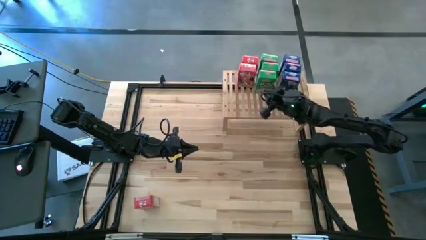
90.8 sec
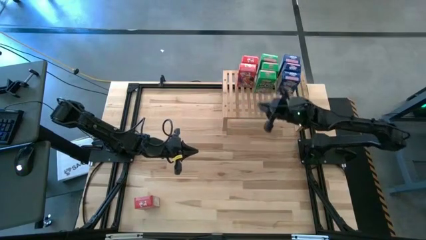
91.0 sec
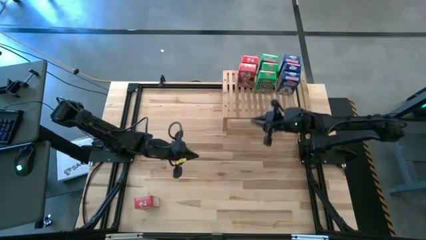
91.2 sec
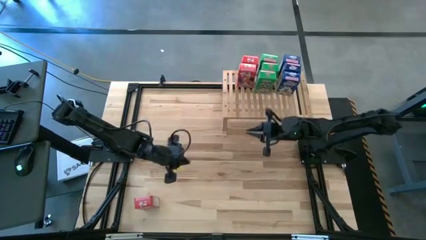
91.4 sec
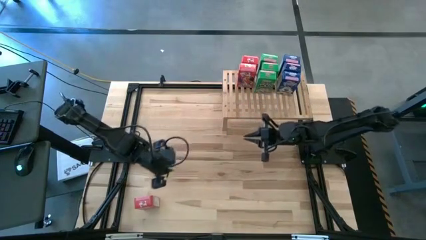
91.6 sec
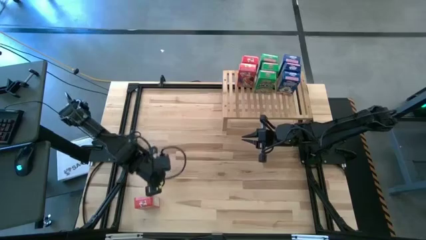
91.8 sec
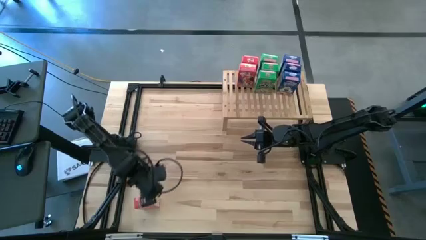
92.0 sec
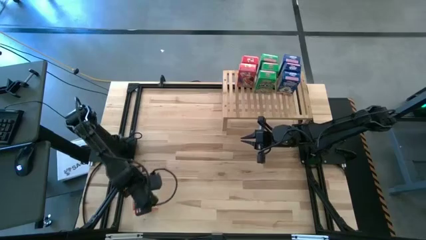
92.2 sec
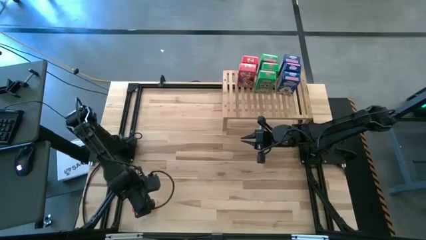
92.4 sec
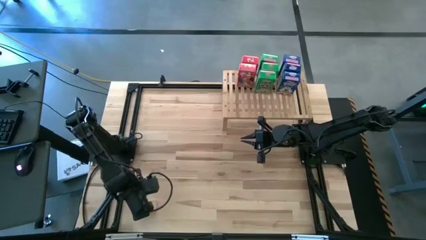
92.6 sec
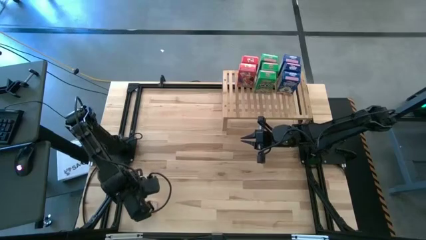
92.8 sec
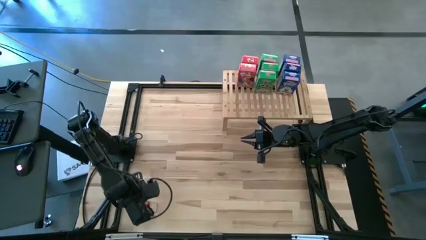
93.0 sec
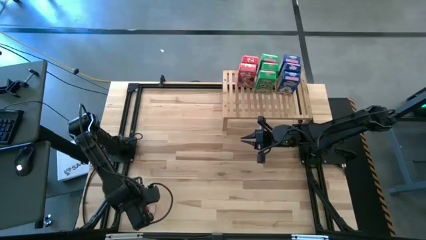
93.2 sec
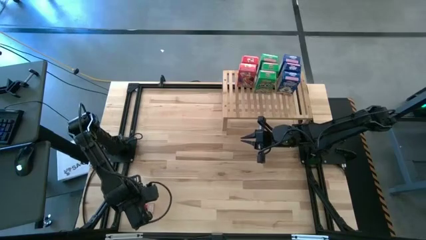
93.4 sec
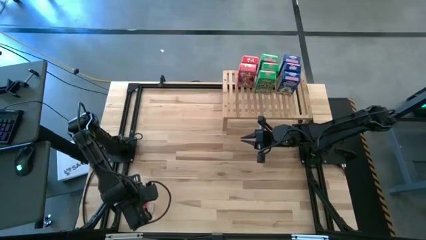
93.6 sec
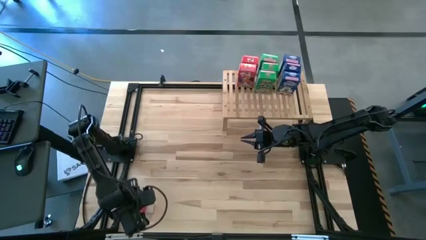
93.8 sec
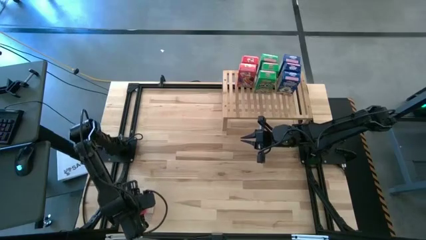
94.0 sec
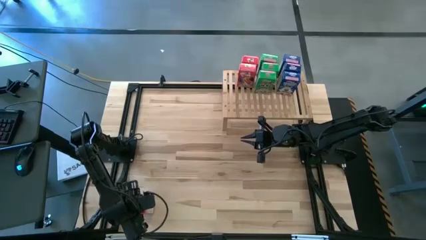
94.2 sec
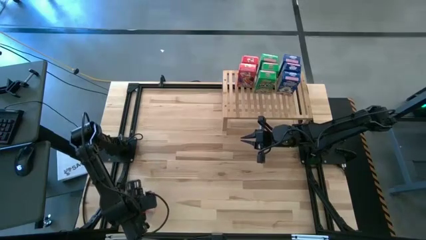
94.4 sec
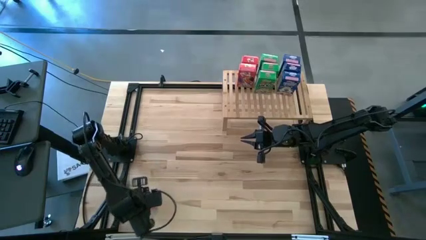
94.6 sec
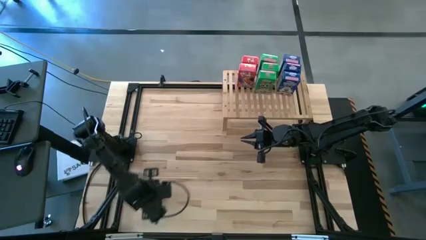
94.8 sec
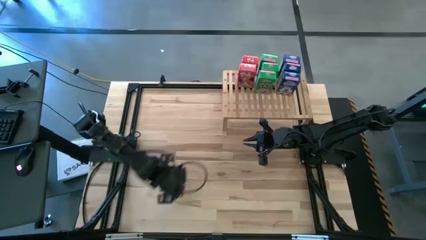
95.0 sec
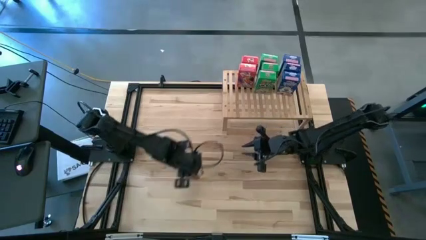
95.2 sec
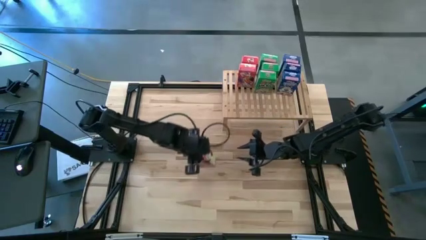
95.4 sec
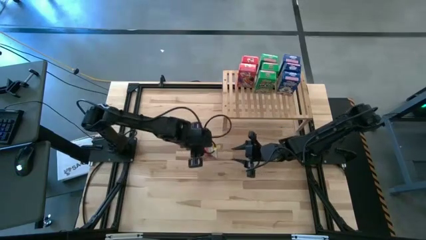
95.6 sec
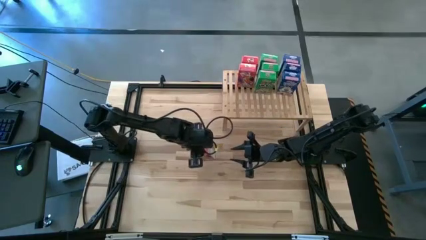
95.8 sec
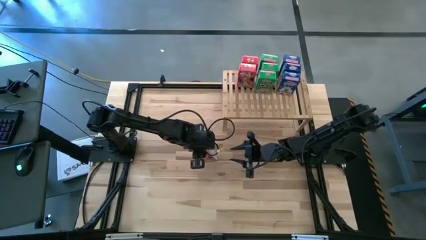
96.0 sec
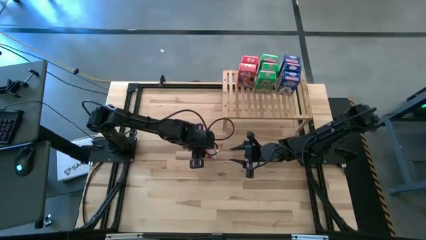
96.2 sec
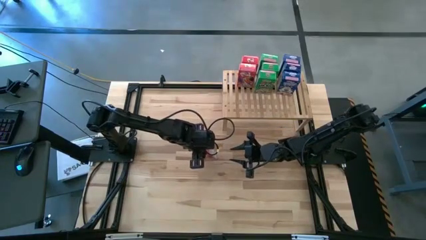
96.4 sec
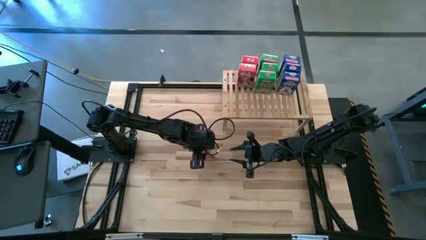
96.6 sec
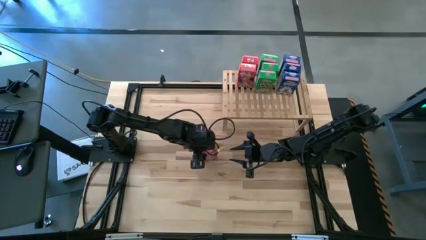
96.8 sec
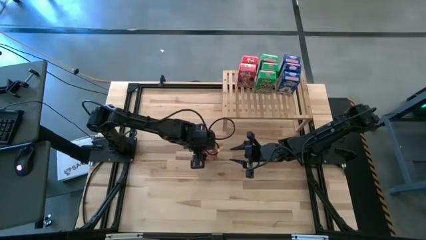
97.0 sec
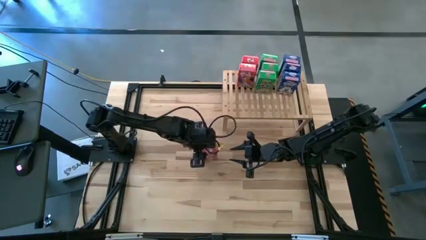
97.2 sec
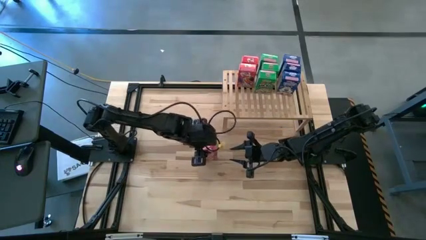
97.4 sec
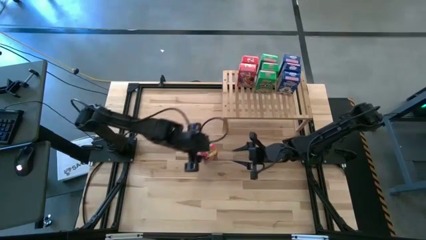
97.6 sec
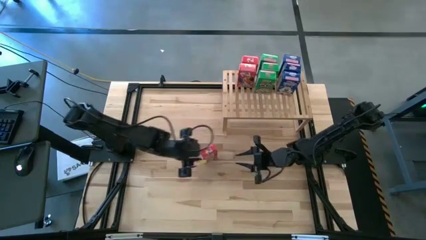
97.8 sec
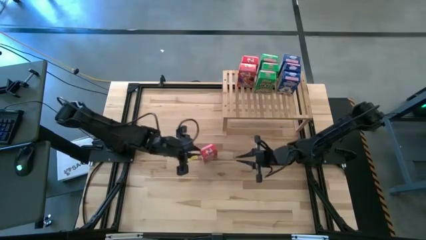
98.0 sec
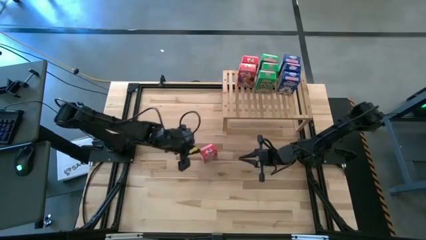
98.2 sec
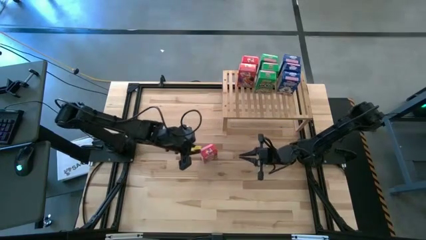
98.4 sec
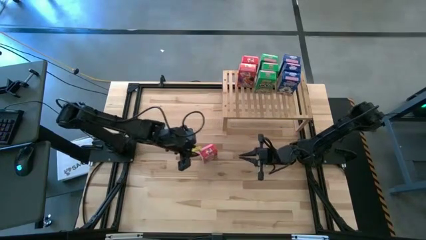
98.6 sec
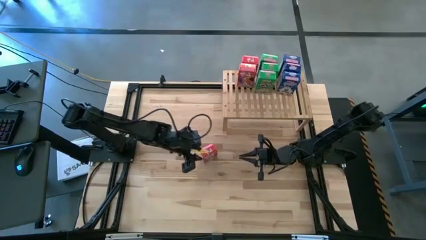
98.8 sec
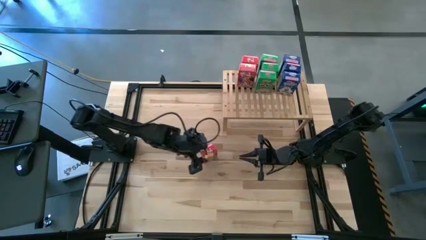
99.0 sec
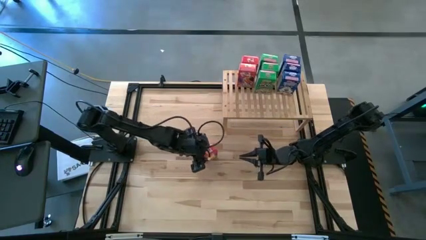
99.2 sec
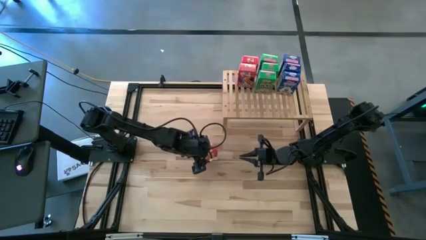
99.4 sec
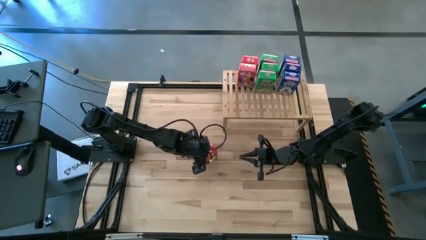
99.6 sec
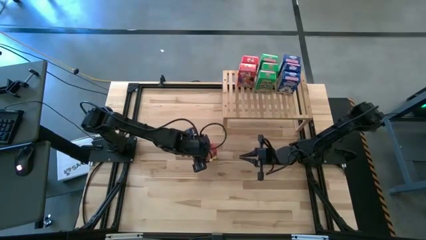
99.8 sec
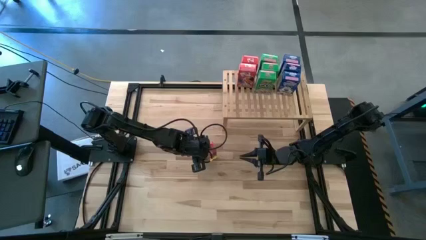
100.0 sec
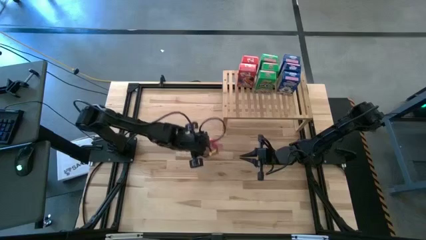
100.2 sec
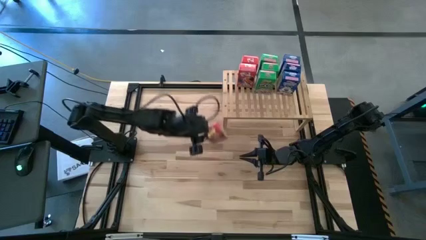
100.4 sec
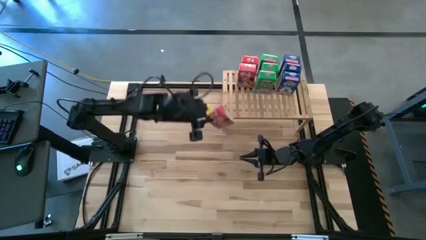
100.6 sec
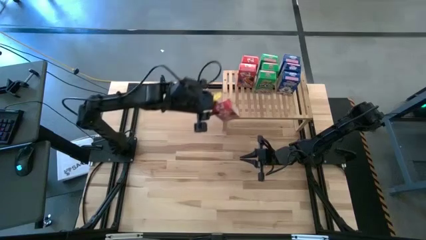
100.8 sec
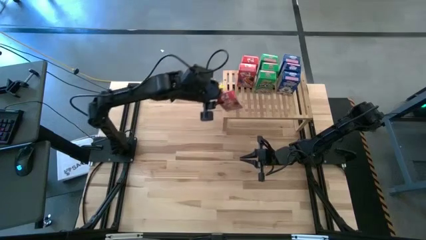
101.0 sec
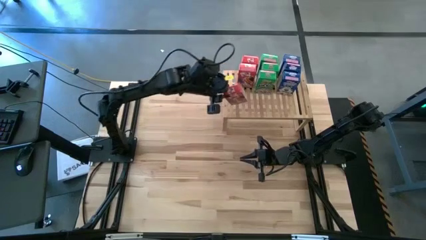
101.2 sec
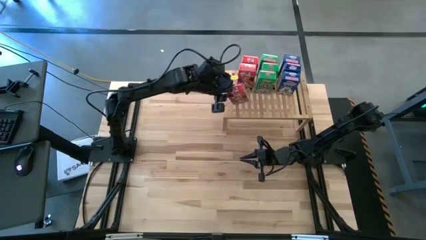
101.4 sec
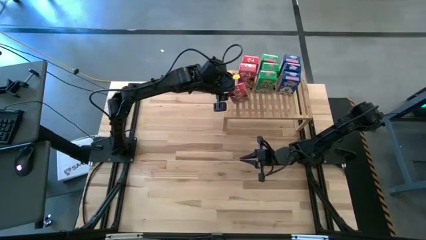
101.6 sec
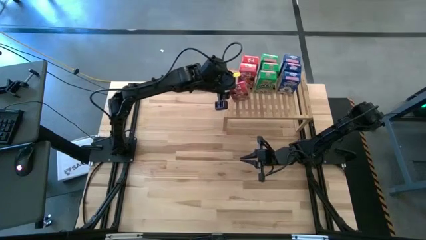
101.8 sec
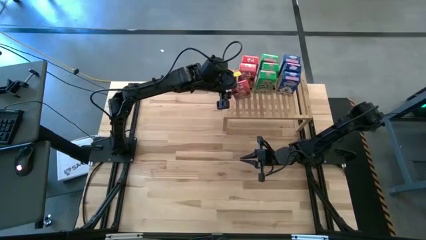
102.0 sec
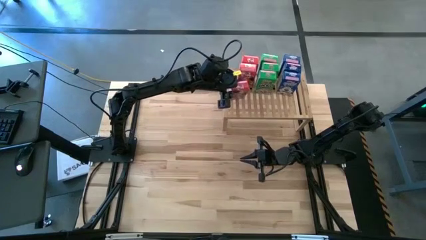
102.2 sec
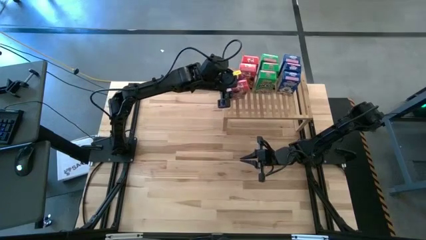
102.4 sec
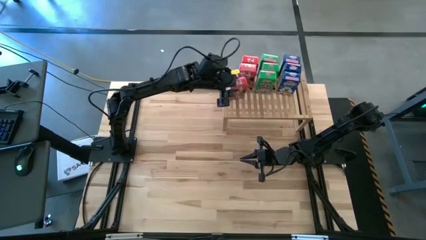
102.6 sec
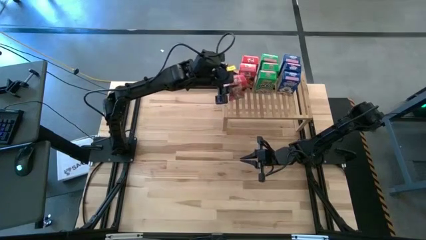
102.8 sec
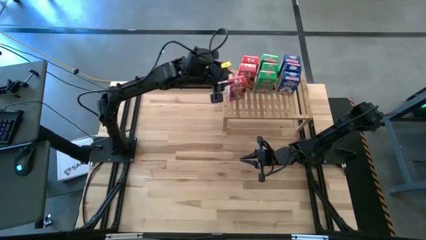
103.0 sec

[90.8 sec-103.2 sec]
Task: Stack cereal on shelf
Put the red cereal box on the shelf aligned with other red cereal box

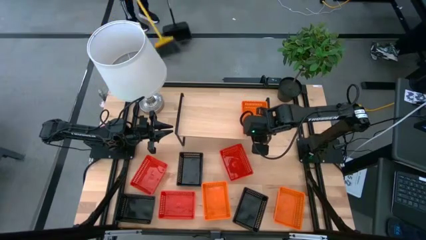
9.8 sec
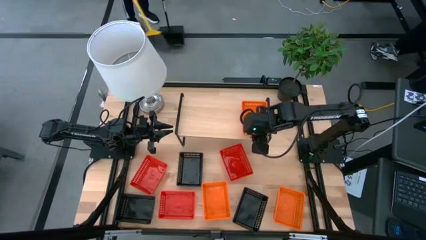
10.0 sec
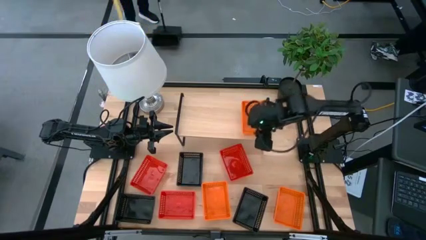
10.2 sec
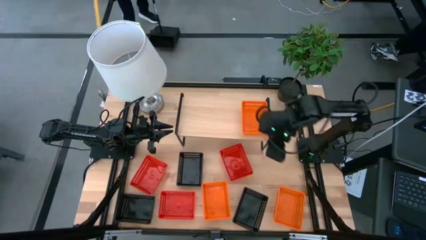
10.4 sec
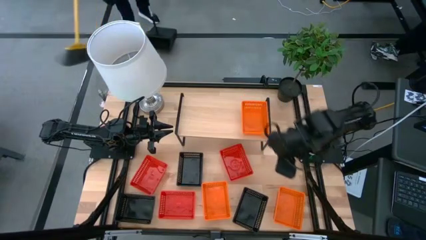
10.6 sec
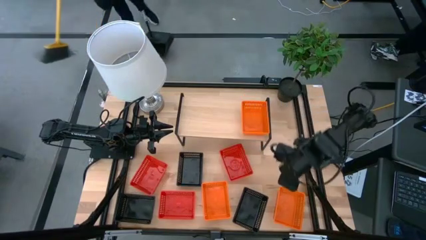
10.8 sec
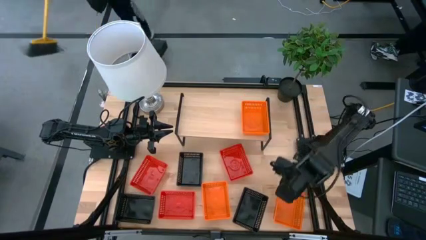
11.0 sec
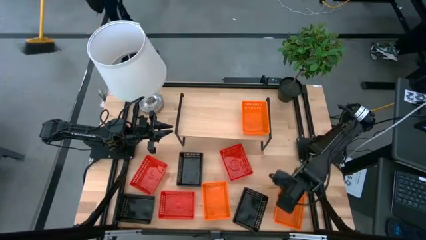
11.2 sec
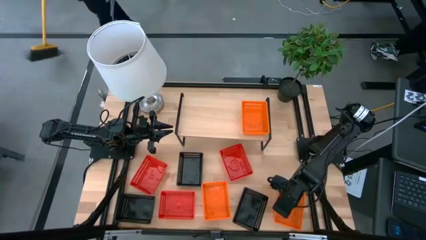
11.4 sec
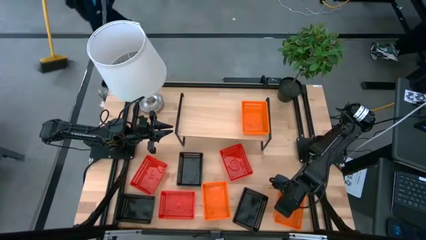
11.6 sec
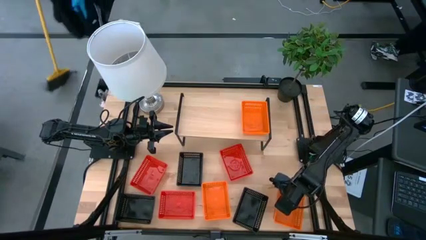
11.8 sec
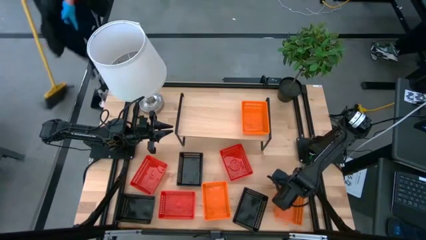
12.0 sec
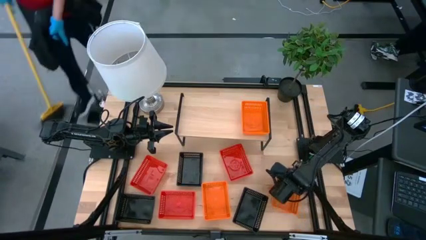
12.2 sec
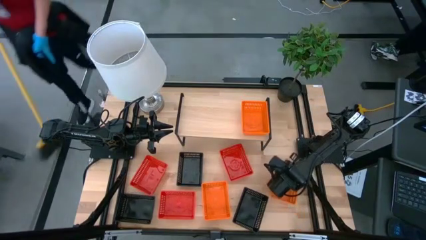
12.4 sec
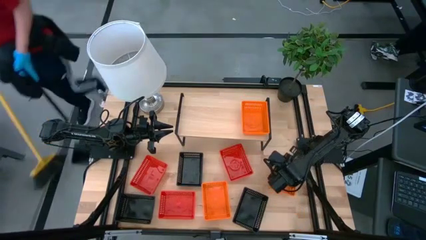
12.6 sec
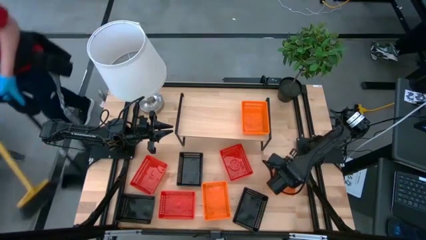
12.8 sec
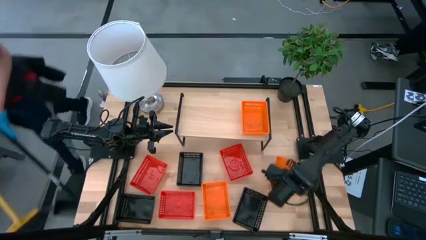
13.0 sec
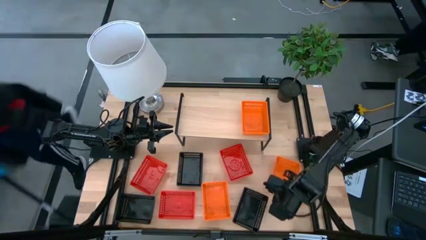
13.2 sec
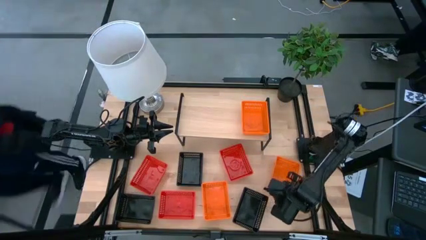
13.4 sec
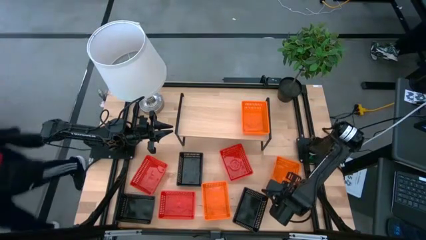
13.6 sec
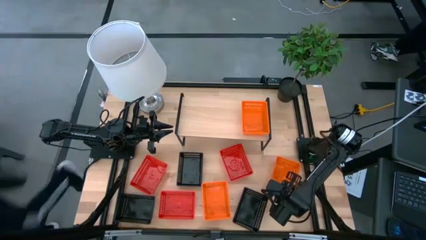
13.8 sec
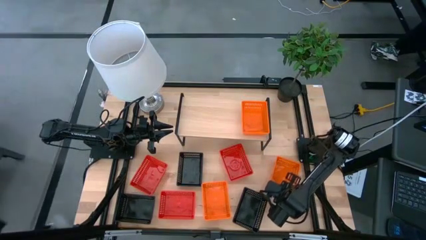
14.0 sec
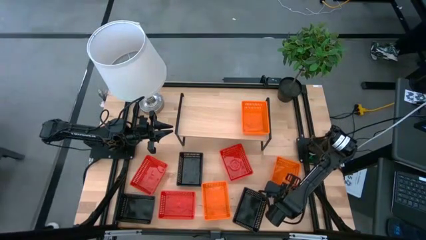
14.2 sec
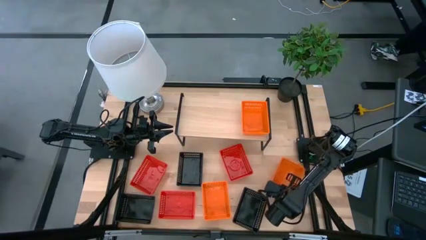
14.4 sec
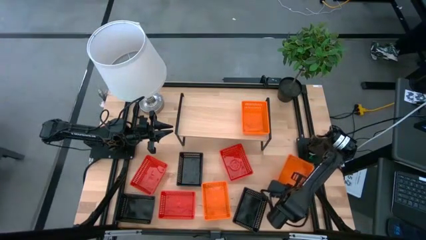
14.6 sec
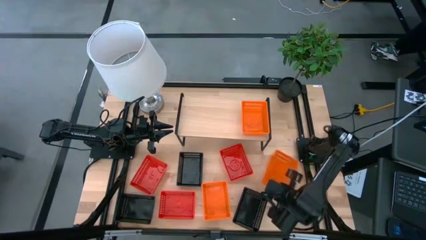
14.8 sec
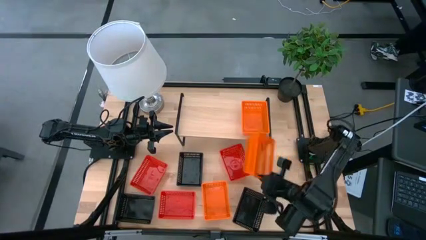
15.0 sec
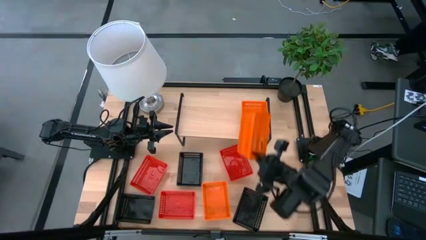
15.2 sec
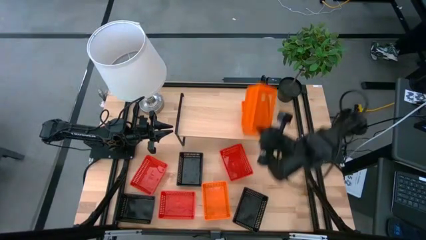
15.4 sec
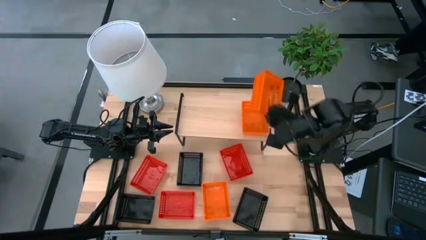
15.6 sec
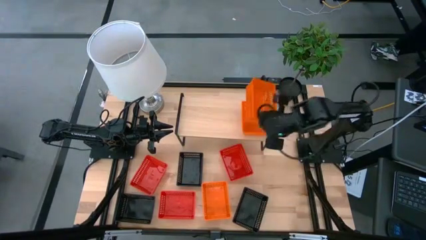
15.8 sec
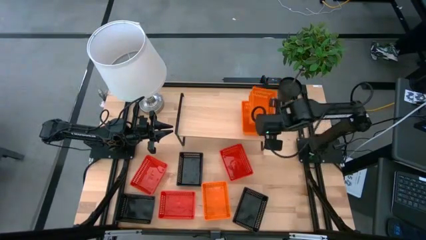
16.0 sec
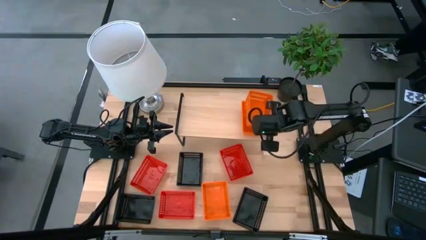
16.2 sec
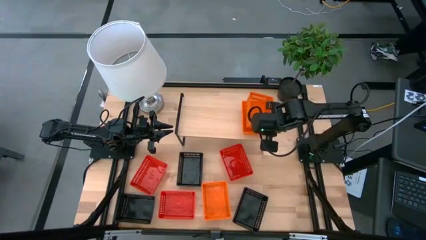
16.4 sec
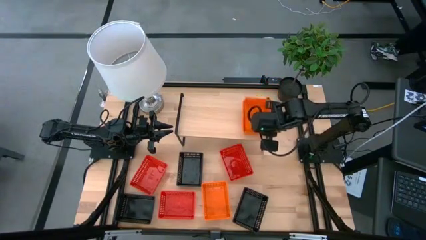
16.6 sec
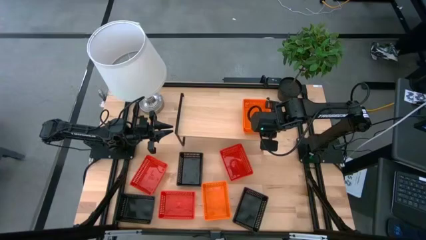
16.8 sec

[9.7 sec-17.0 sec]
Task: Stack baskets on shelf by color
Stack the right orange bin on top of the orange bin
